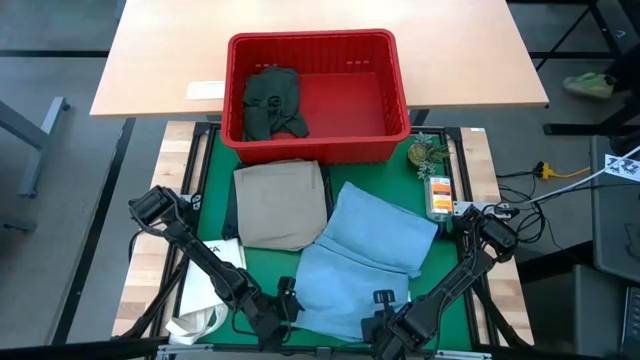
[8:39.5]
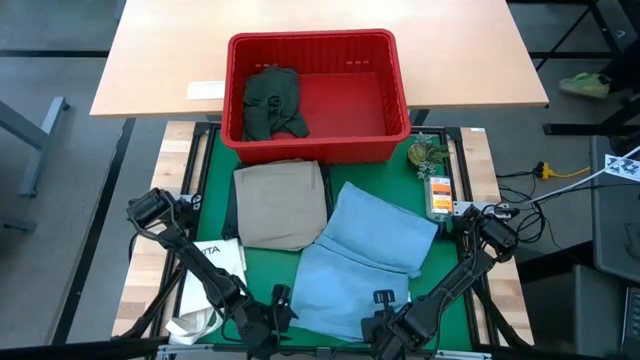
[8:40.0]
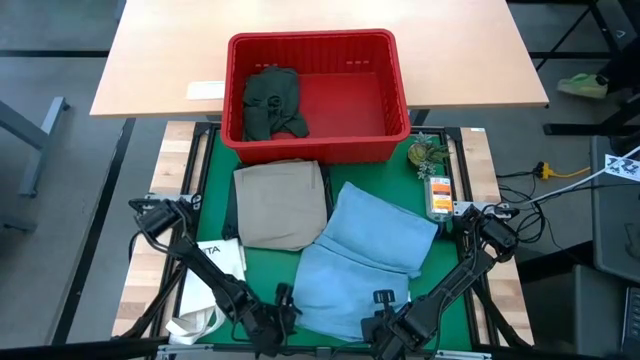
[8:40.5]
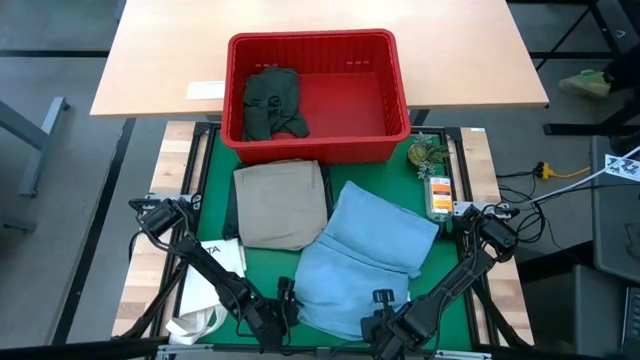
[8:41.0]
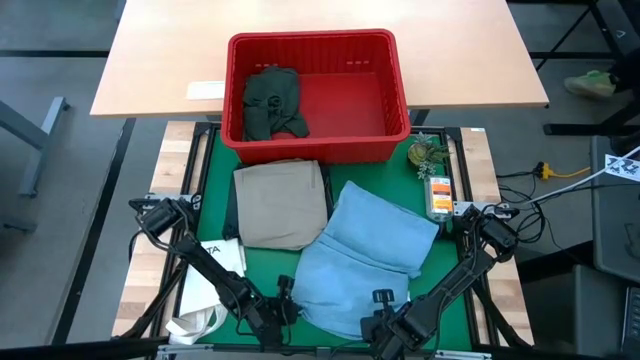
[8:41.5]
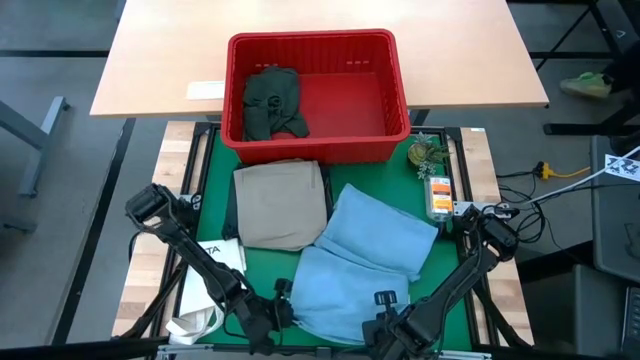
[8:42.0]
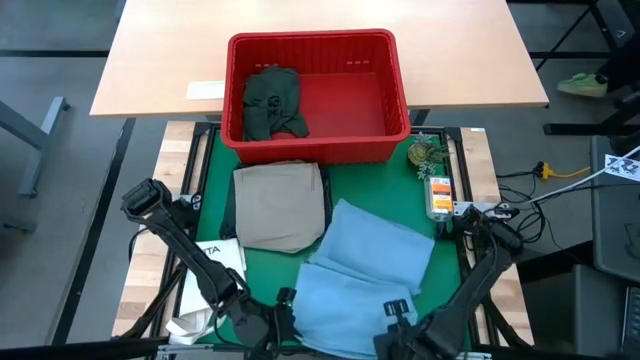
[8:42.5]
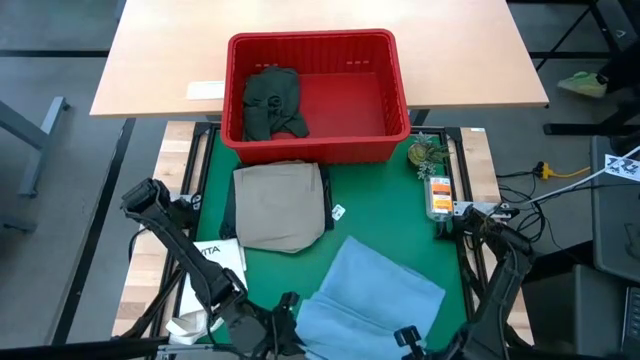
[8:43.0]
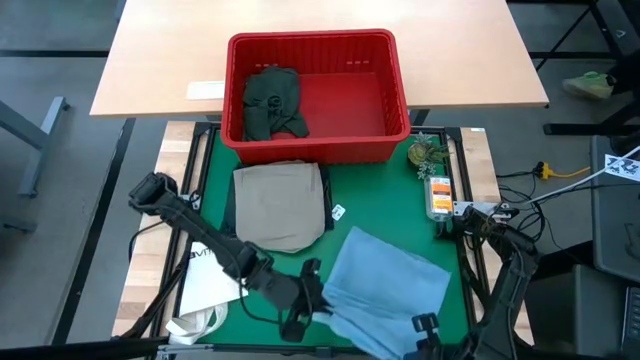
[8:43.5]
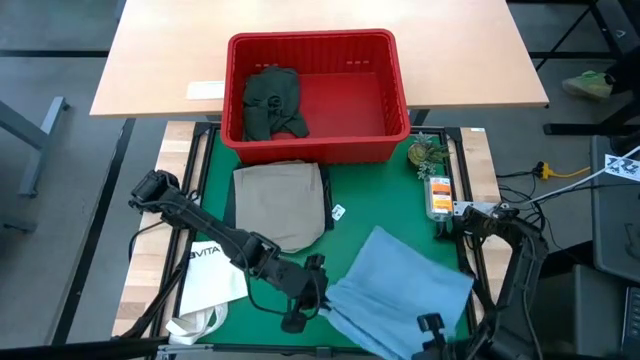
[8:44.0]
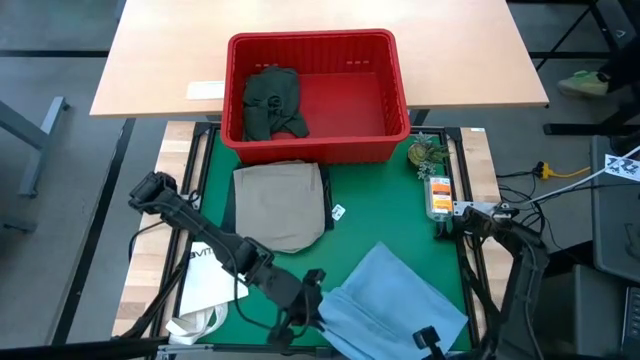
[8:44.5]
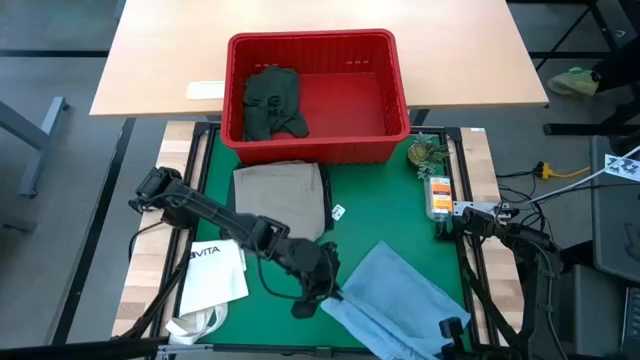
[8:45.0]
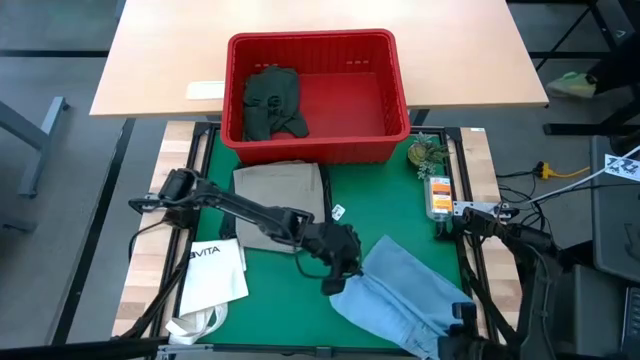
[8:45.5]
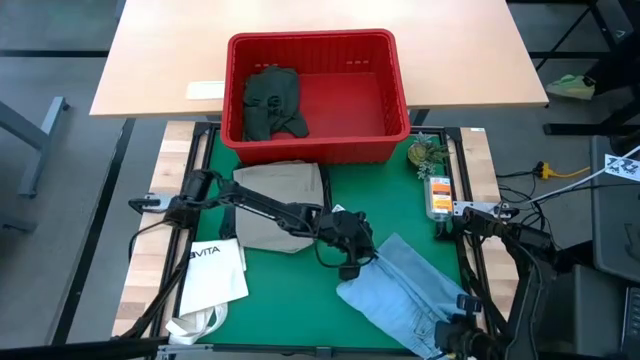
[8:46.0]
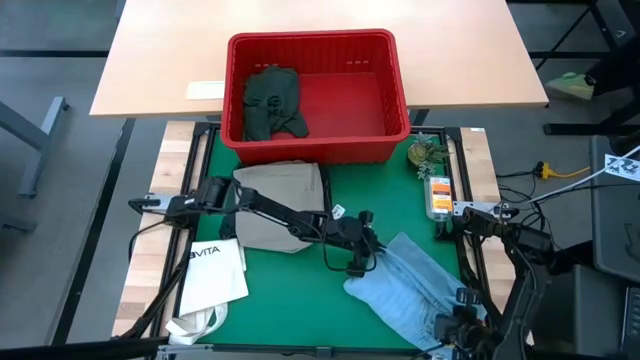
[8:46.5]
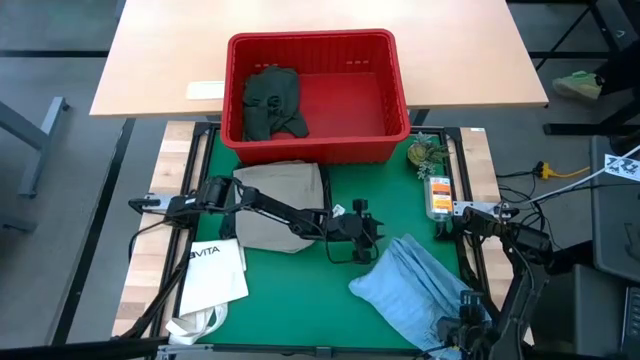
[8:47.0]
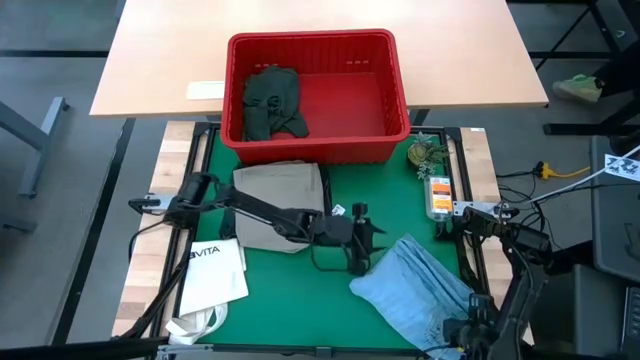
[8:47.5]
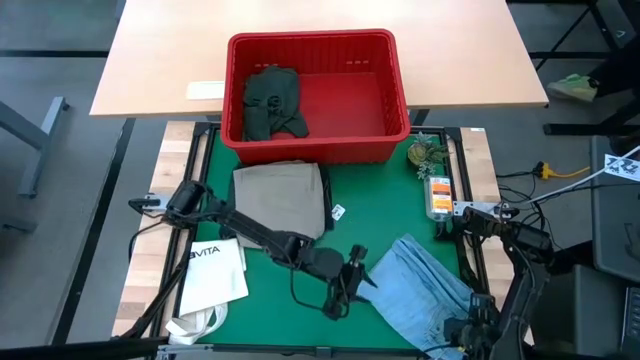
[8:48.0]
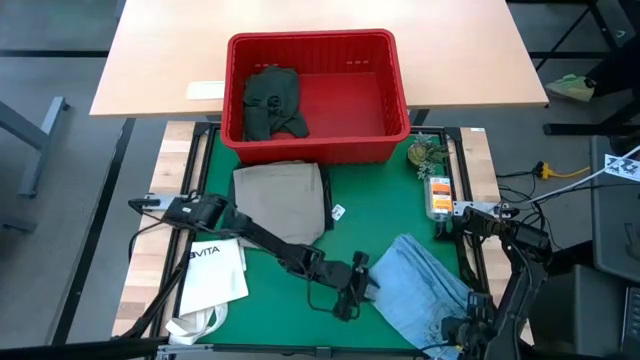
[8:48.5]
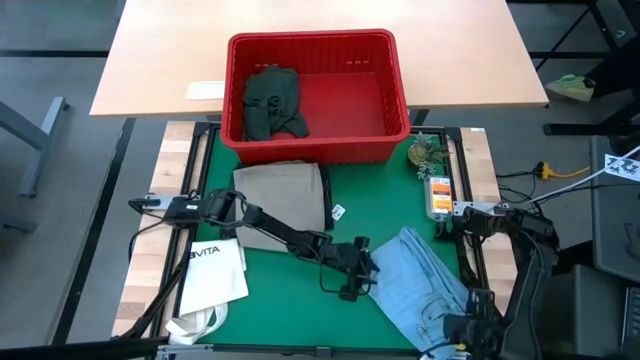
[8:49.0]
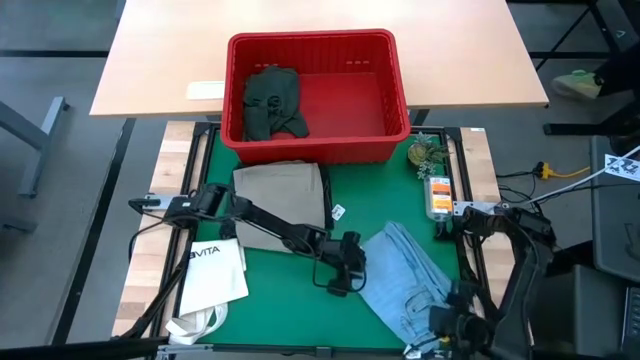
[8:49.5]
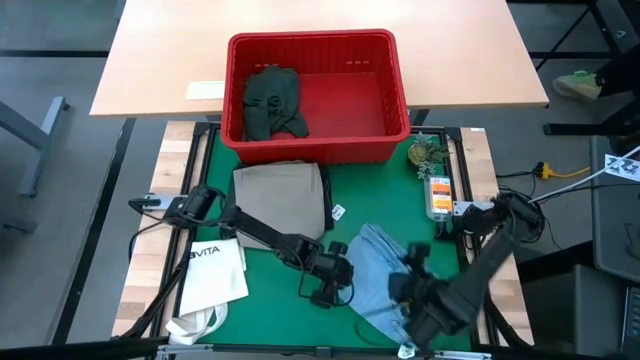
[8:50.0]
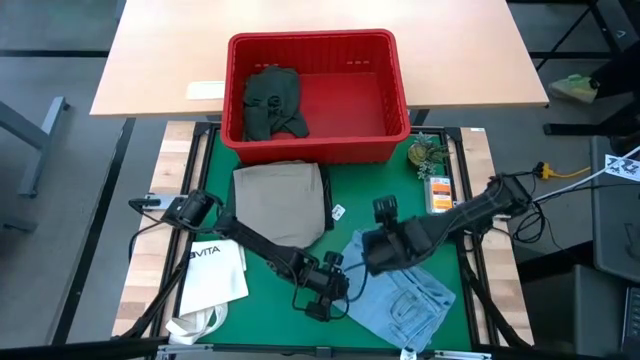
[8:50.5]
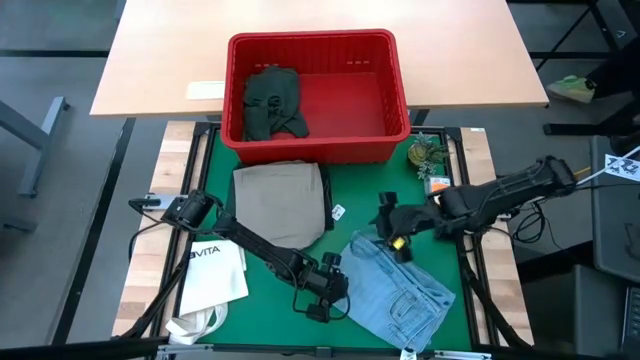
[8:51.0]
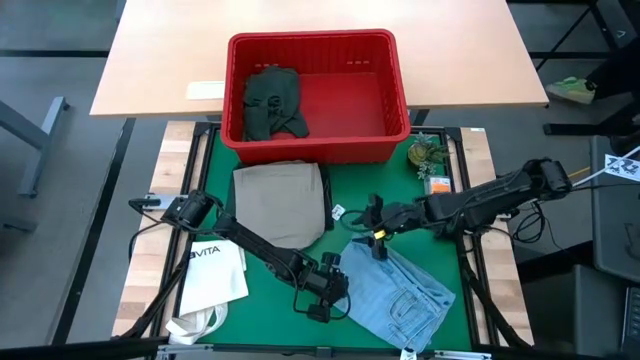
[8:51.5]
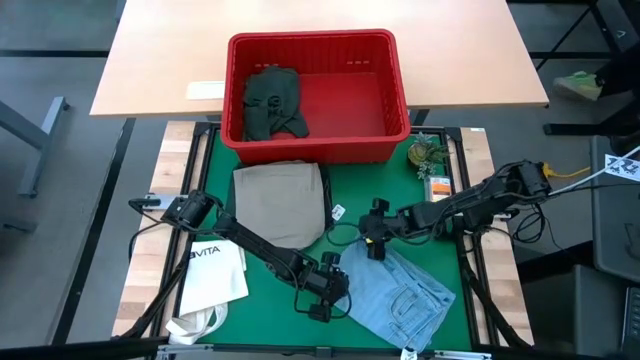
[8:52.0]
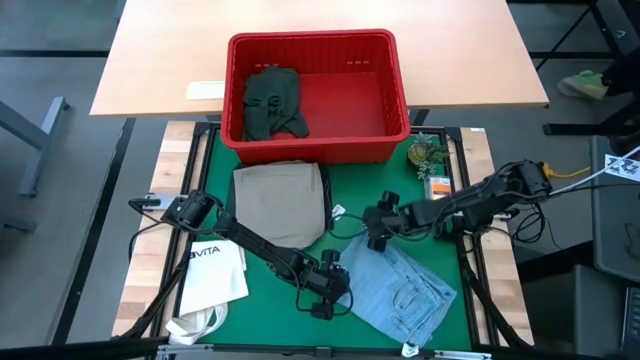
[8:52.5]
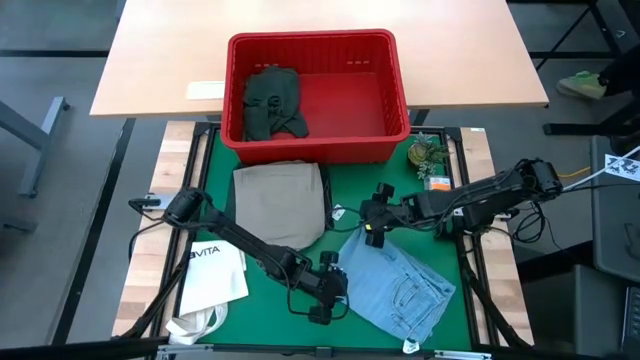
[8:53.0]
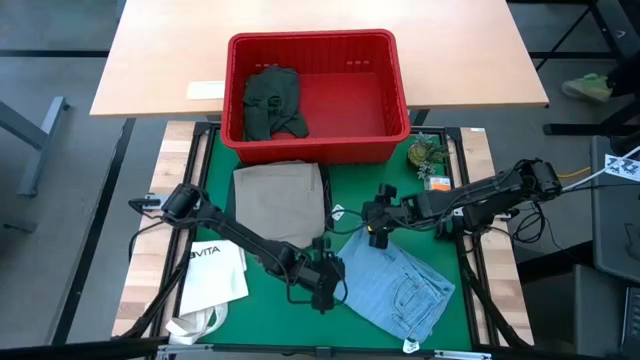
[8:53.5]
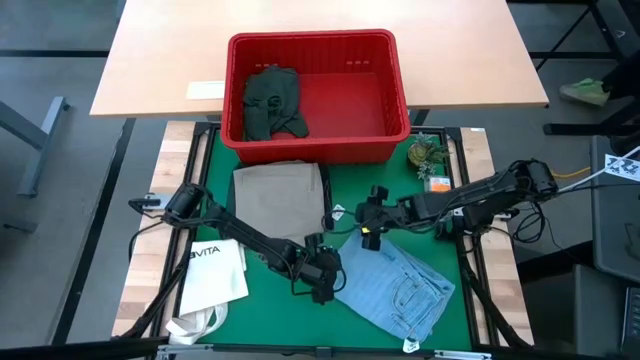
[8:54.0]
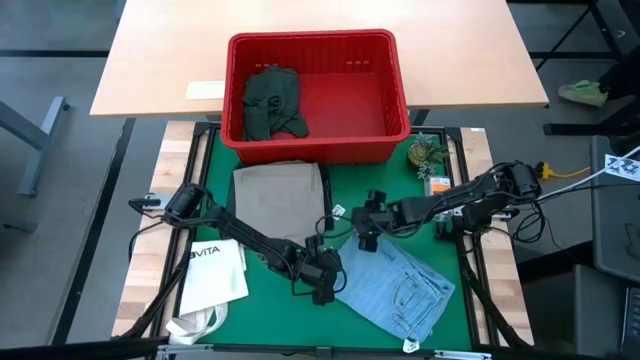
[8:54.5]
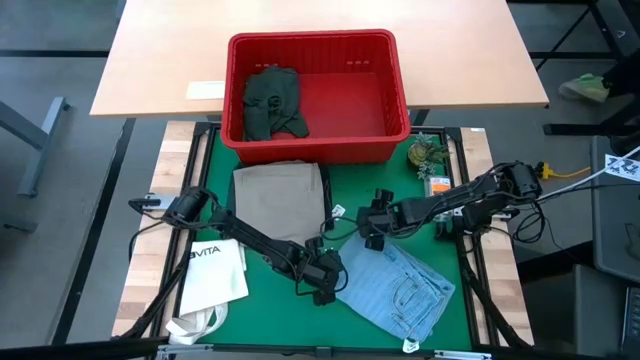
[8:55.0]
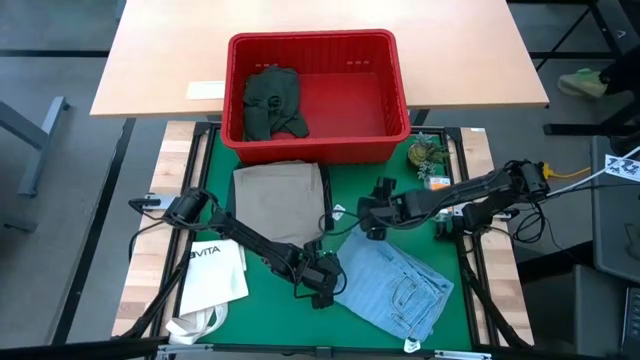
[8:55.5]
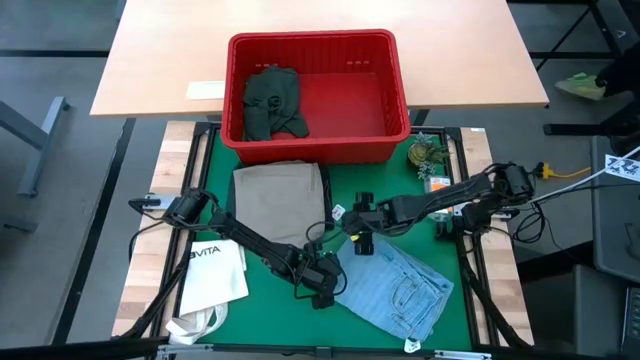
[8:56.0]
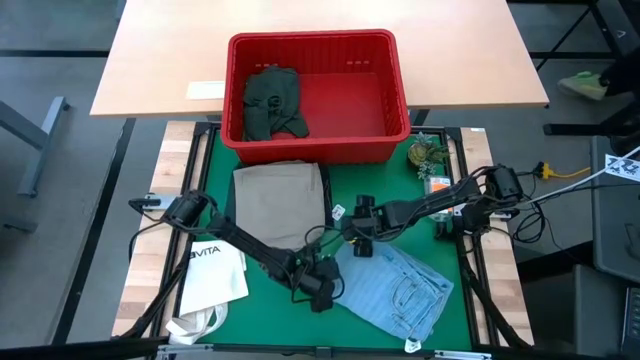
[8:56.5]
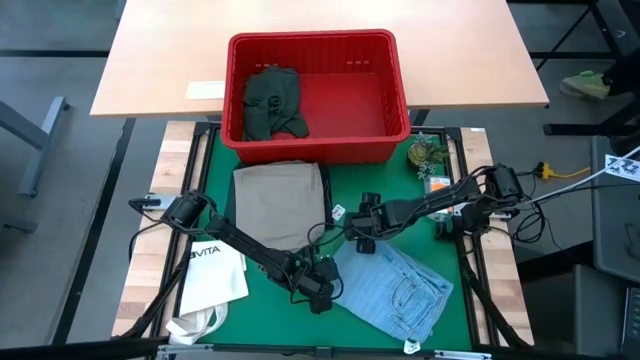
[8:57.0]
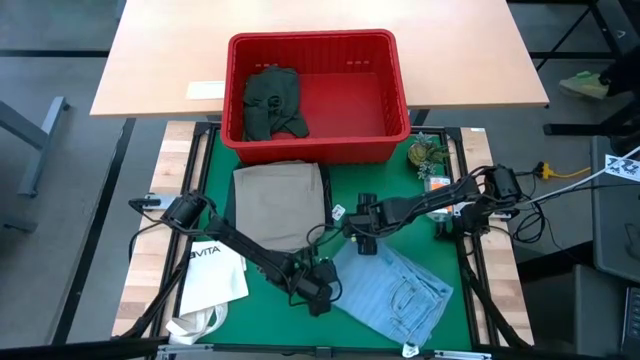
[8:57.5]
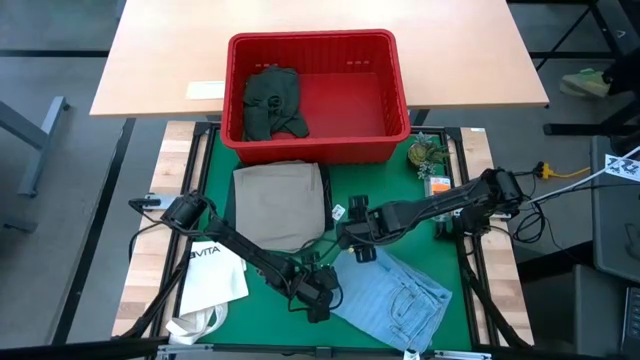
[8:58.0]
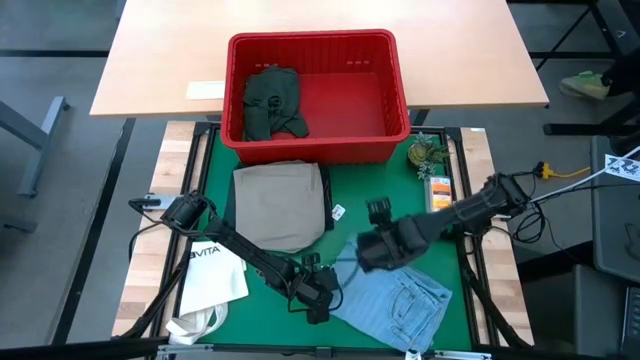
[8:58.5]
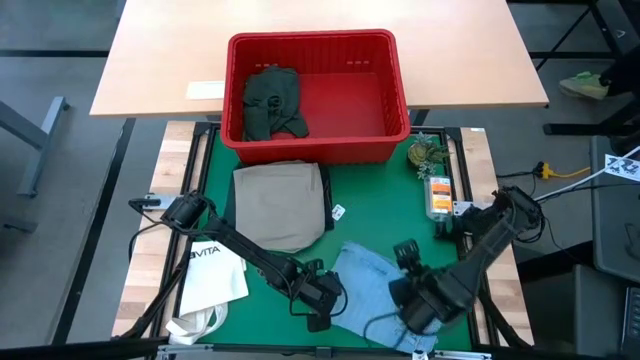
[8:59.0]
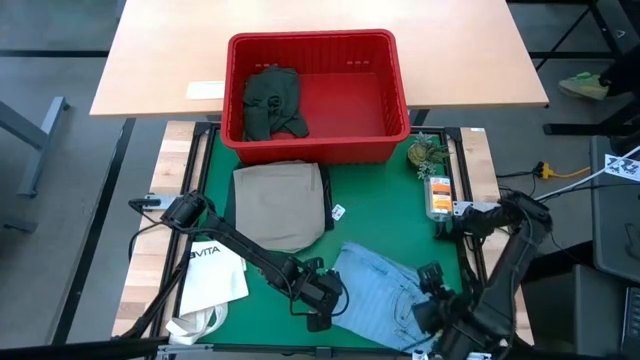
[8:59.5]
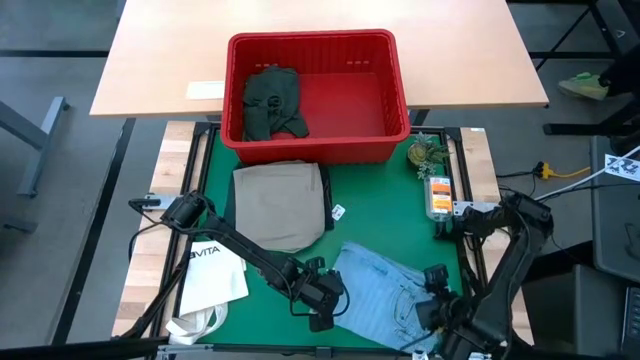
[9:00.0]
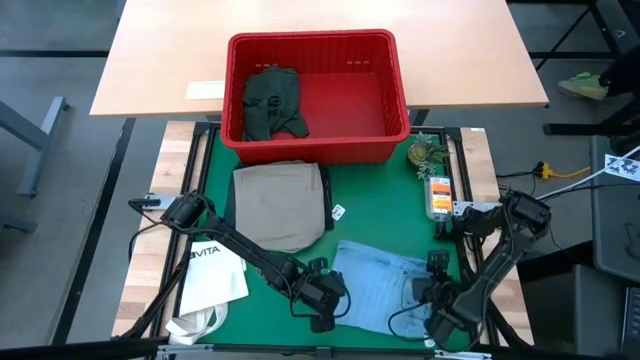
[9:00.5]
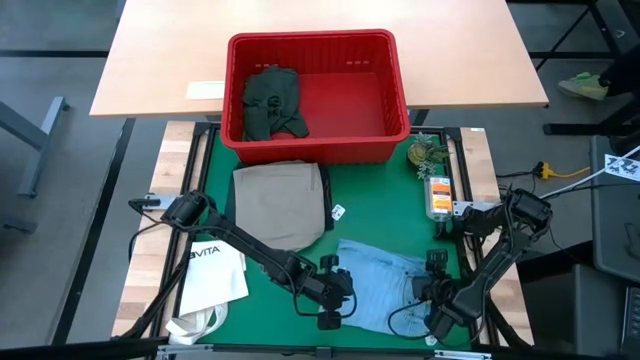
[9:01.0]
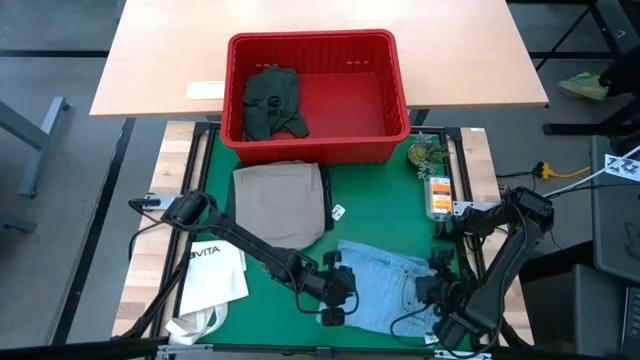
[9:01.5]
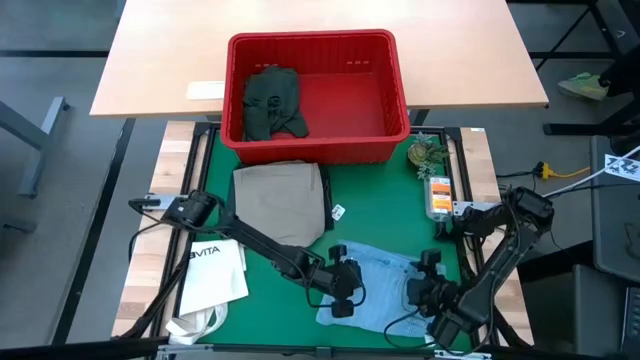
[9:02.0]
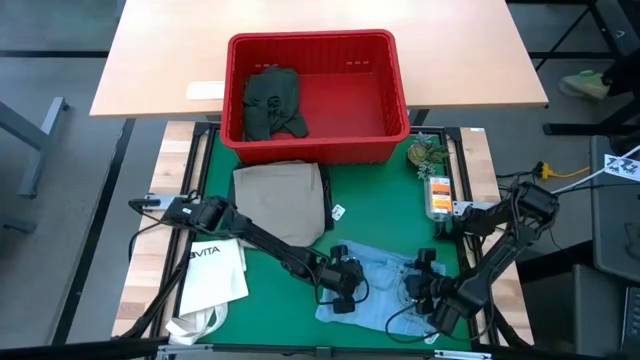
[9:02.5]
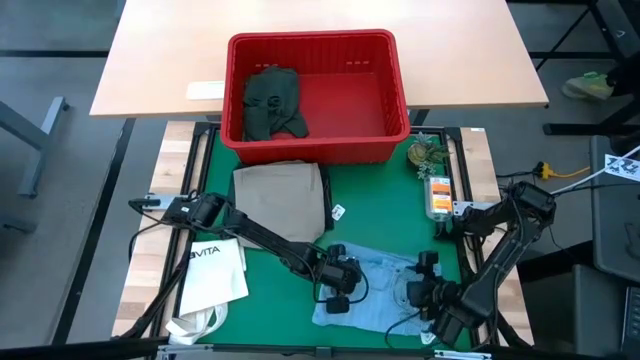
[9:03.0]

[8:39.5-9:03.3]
Task: Fold Laundry from Bin
Fold the light blue pants
